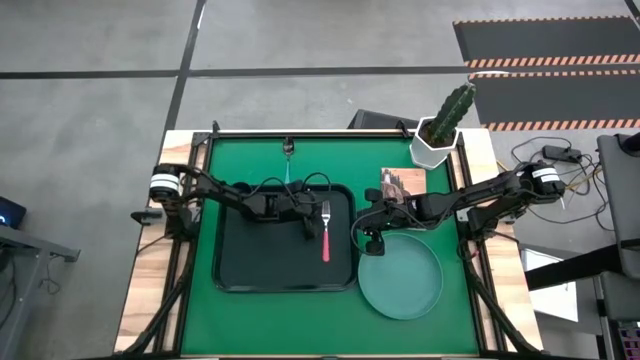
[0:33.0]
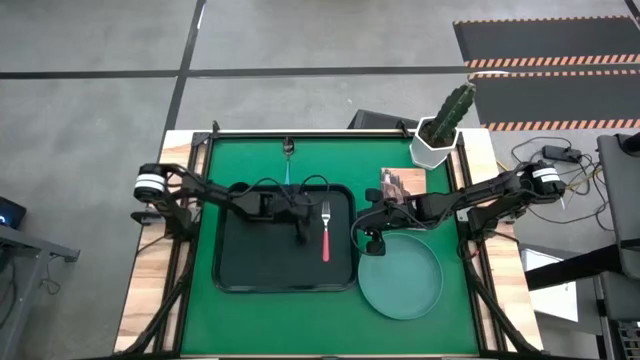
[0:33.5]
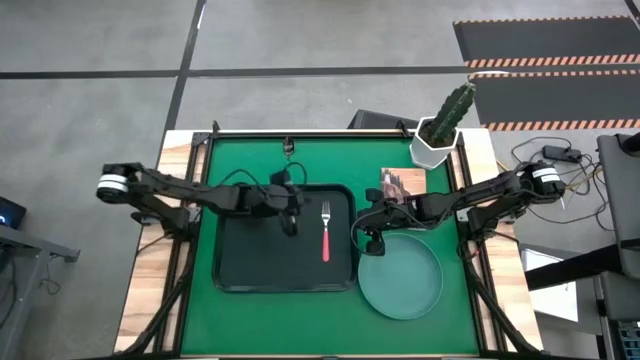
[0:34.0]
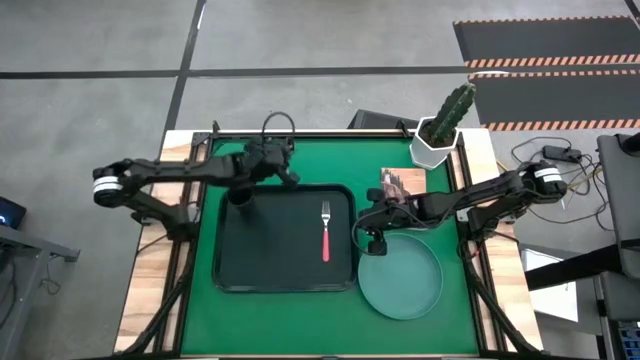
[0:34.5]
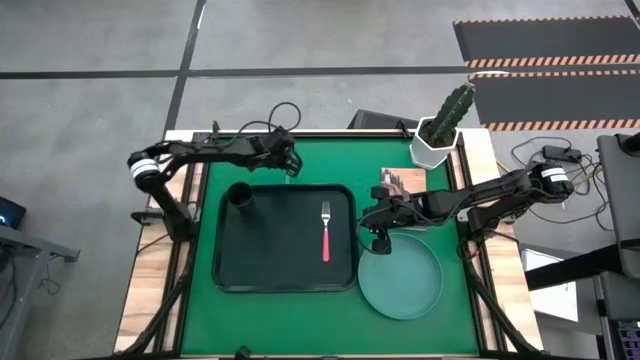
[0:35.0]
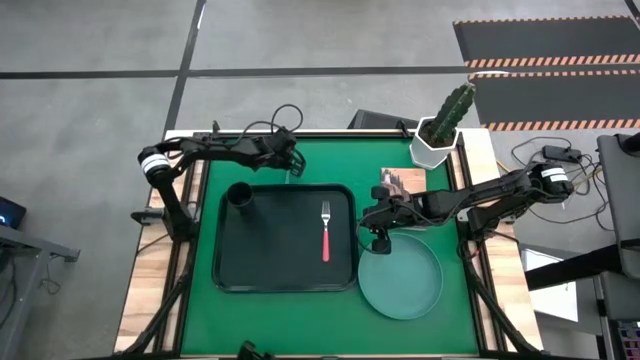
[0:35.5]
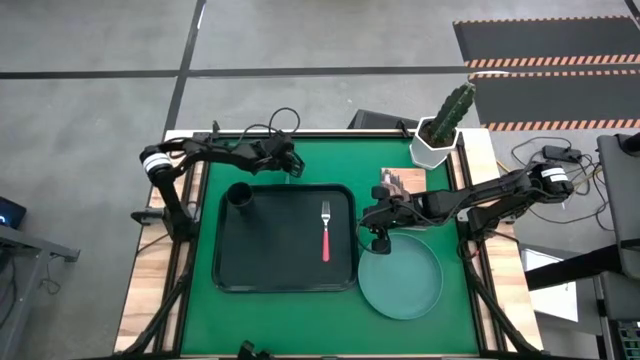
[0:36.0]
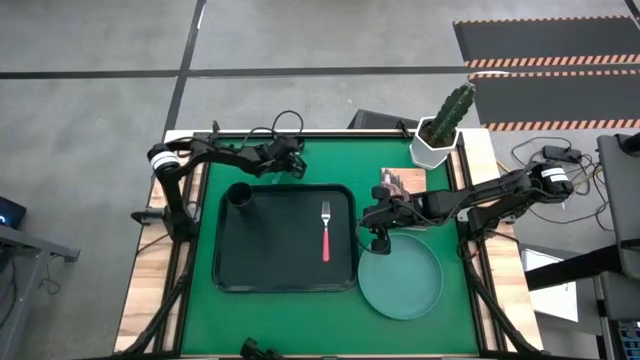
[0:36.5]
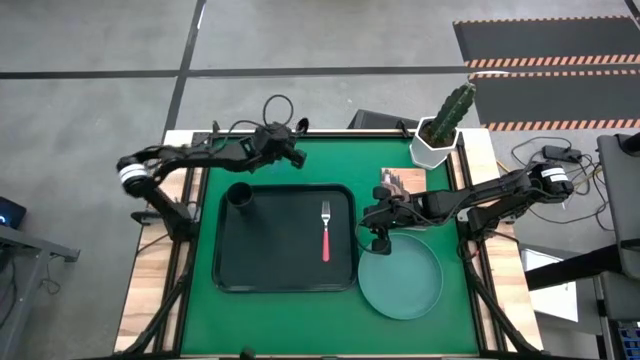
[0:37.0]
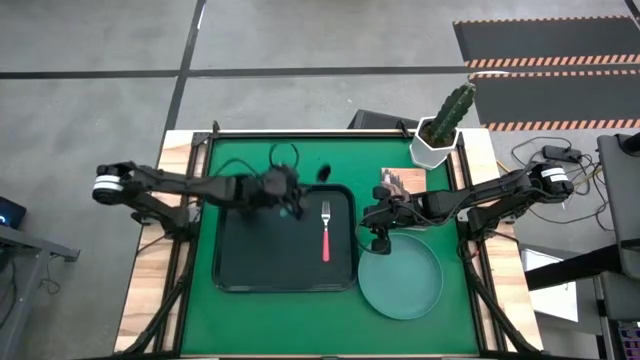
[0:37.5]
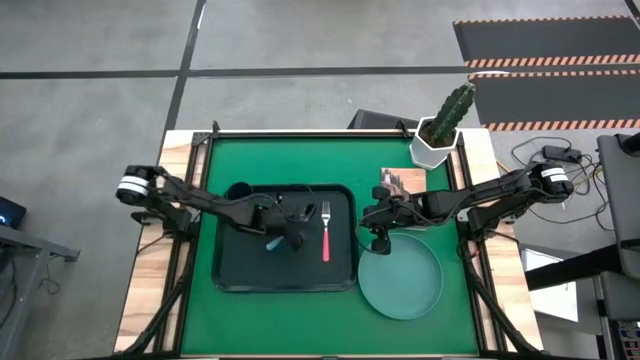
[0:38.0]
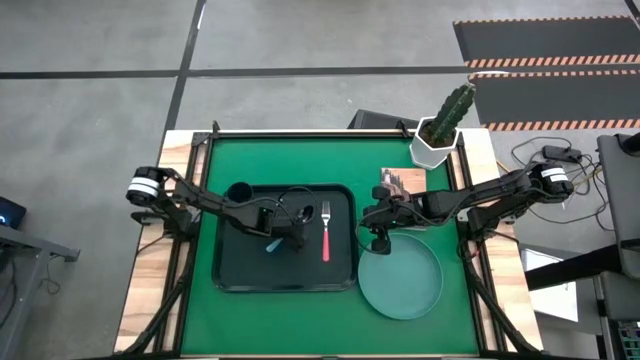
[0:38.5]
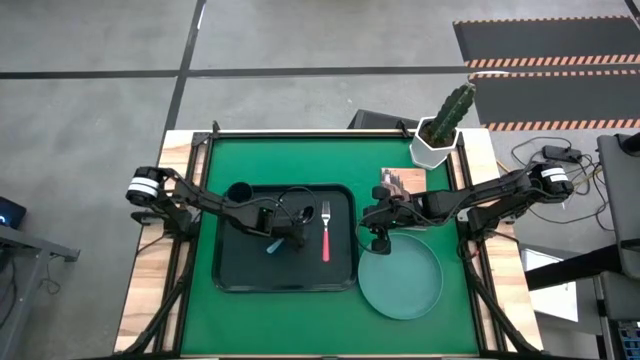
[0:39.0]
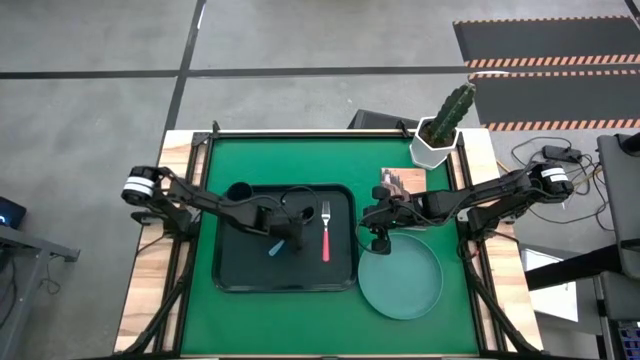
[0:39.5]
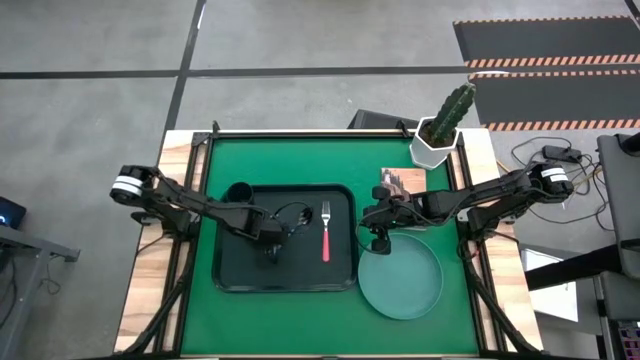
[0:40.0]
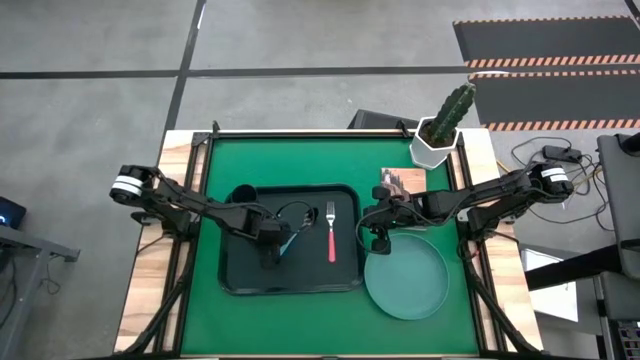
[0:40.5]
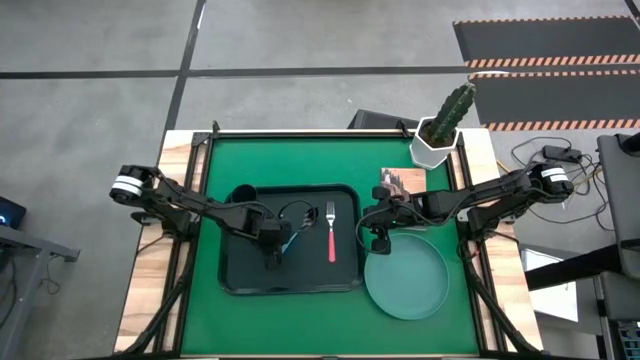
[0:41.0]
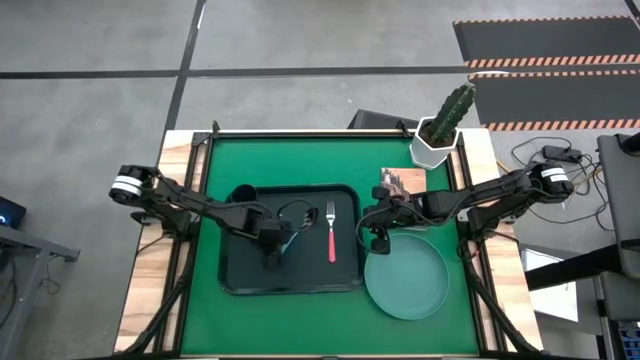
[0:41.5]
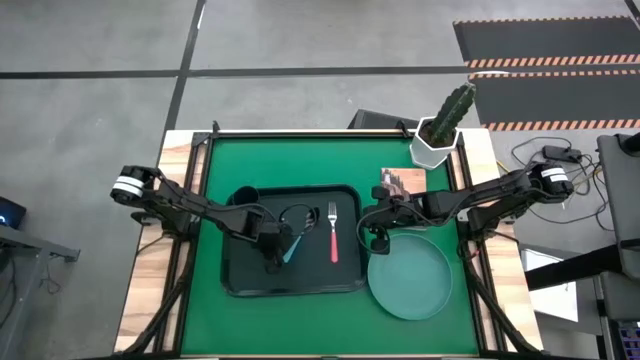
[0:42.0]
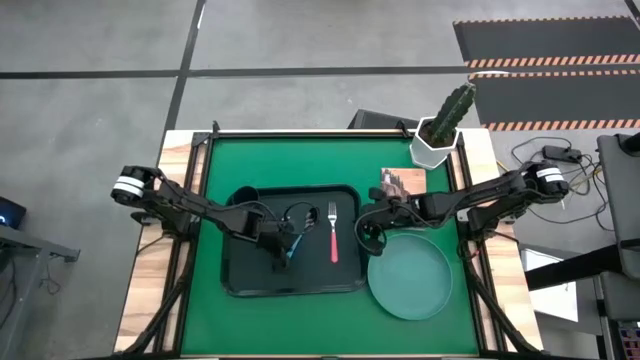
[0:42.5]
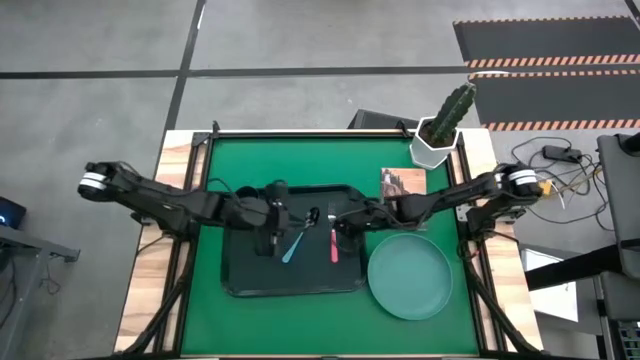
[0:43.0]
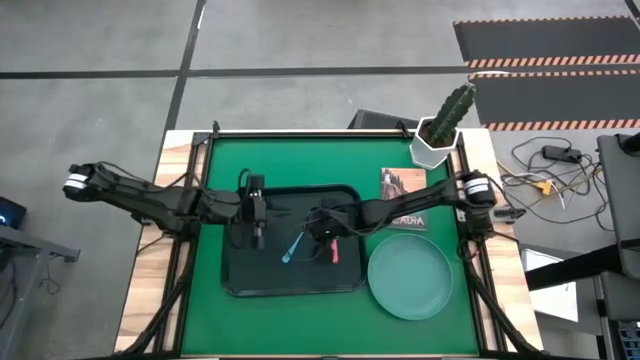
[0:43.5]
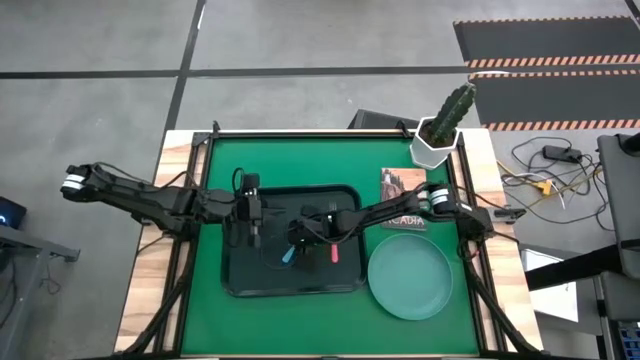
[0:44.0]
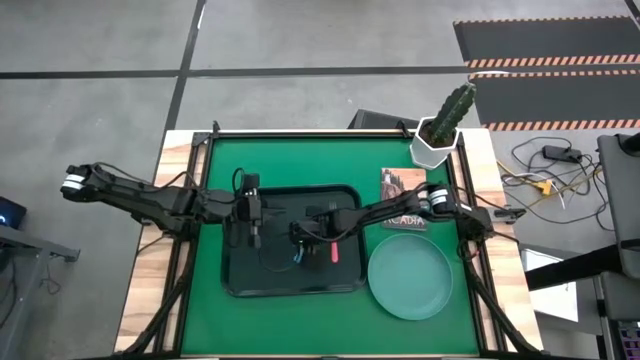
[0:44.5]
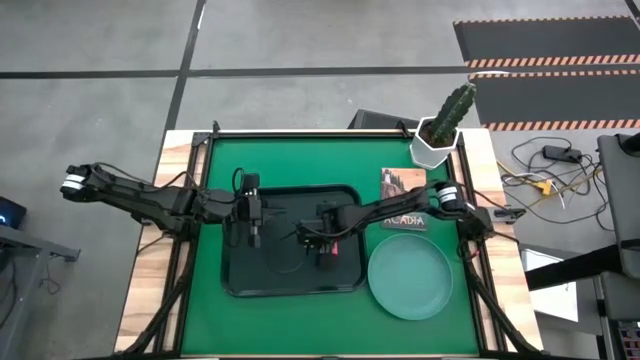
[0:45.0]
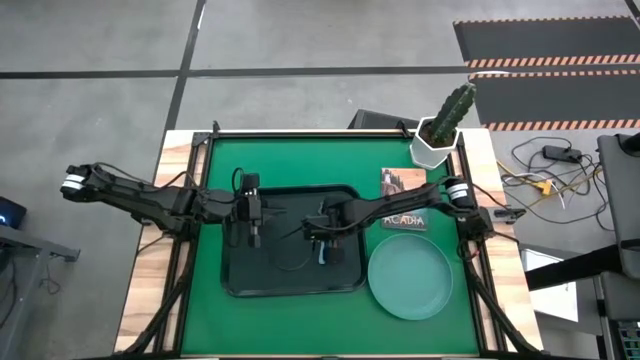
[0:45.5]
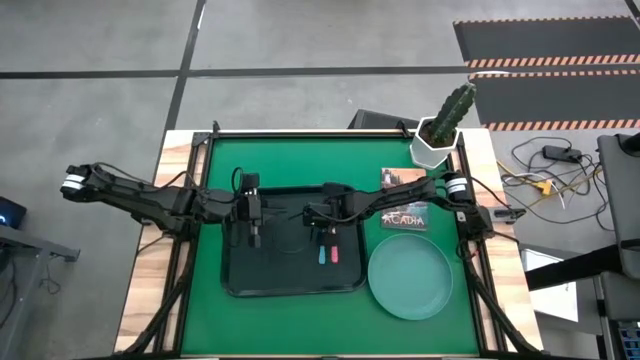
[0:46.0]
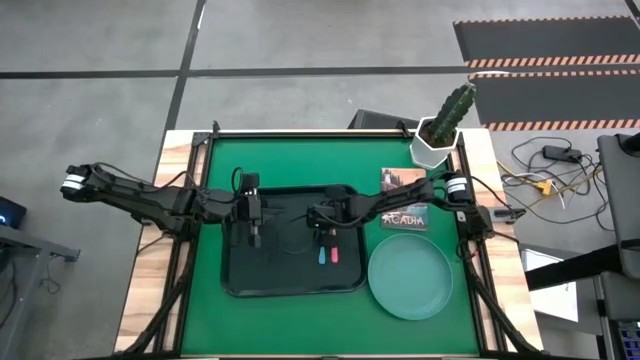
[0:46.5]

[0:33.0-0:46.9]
Task: Pick and place plate/cup/fork/spoon on tray
Put the blue spoon on the black serving tray

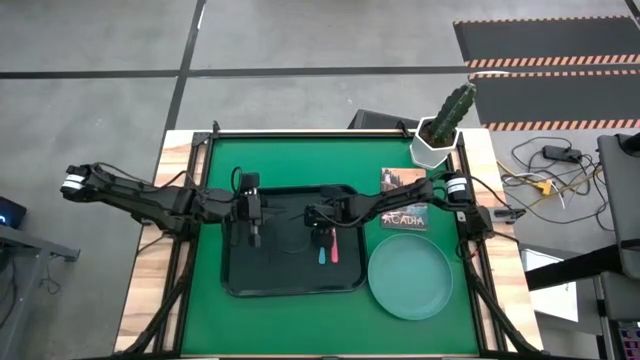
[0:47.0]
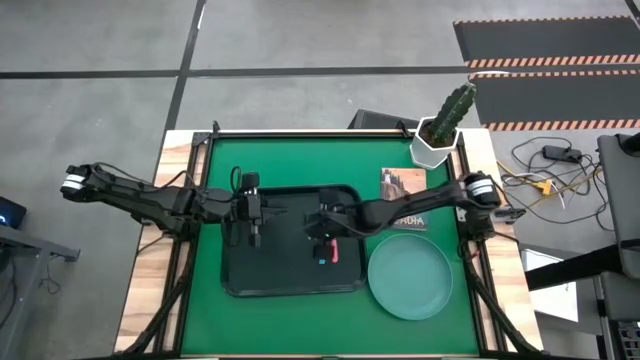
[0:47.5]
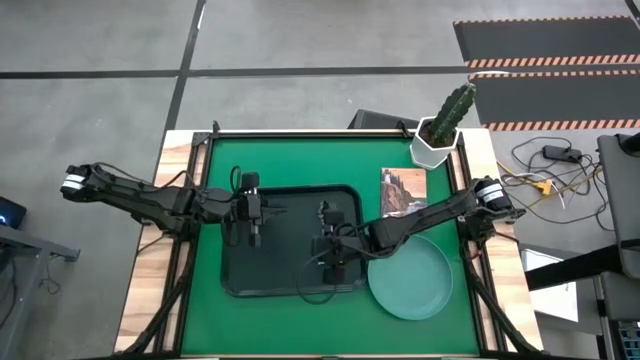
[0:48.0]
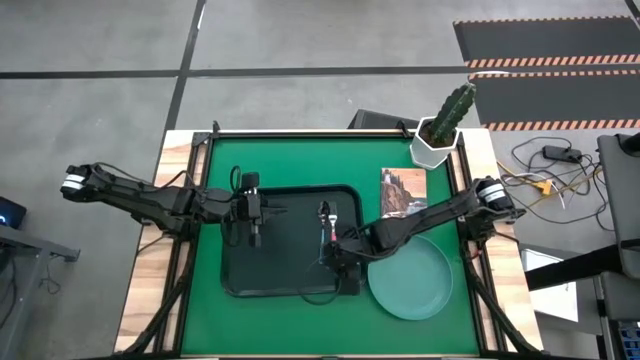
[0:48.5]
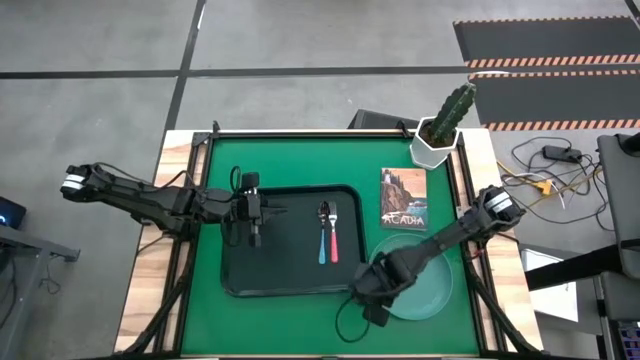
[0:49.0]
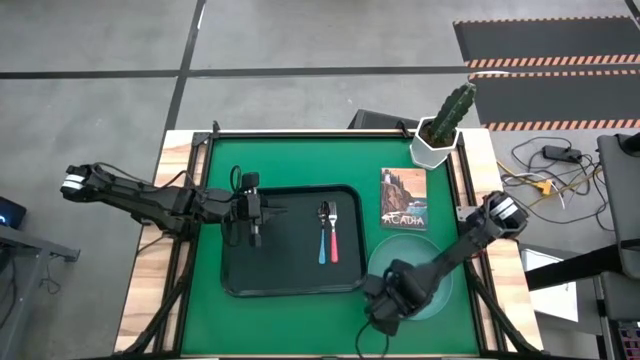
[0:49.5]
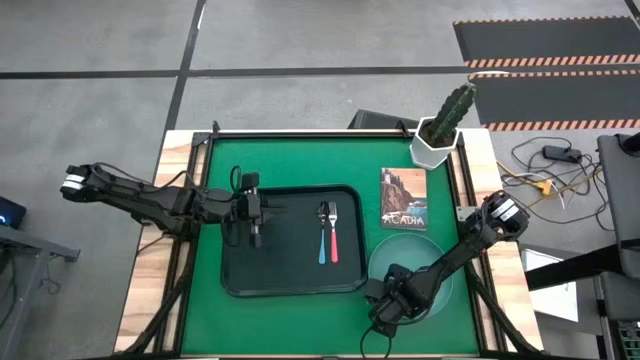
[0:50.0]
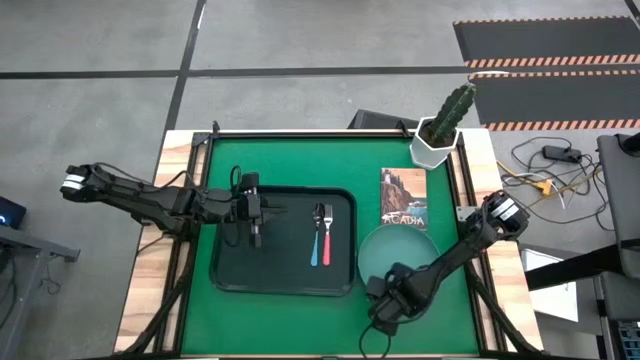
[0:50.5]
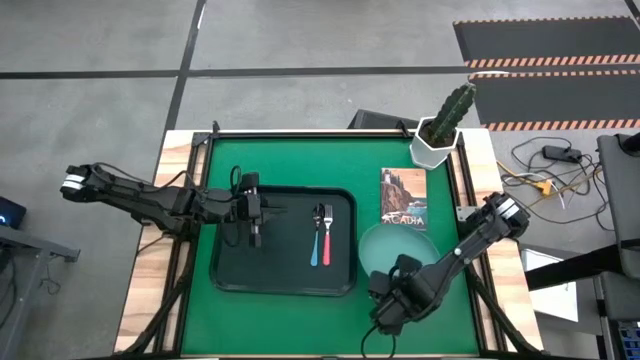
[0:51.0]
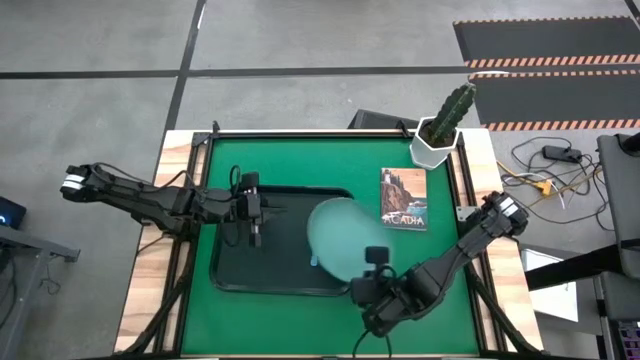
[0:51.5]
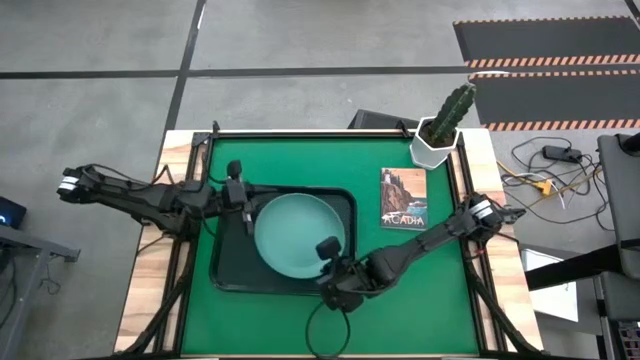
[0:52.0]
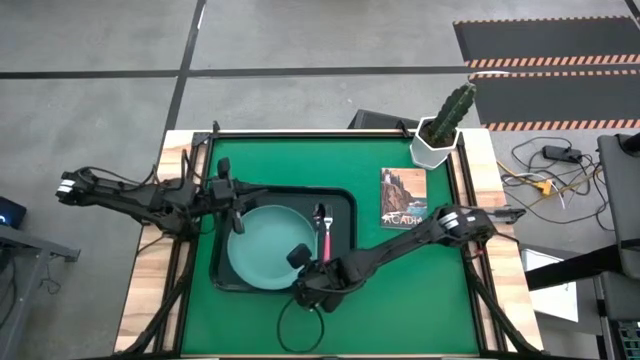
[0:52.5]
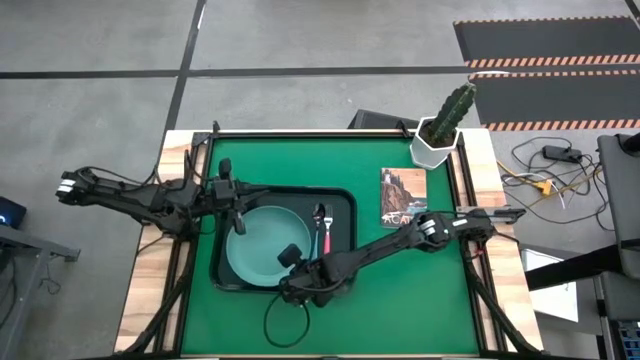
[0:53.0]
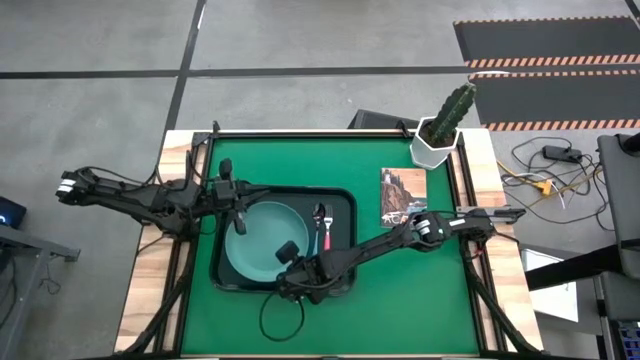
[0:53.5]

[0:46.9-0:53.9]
Put the green plate on the black serving tray
